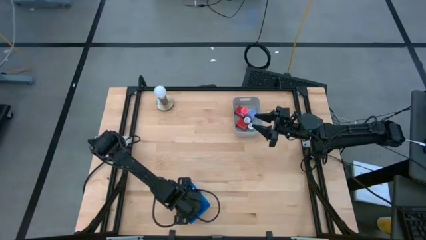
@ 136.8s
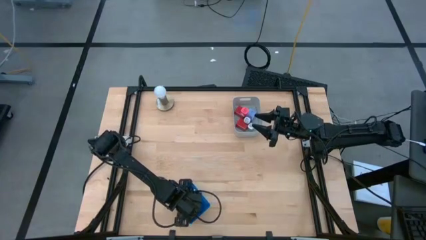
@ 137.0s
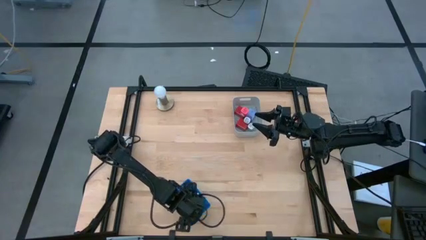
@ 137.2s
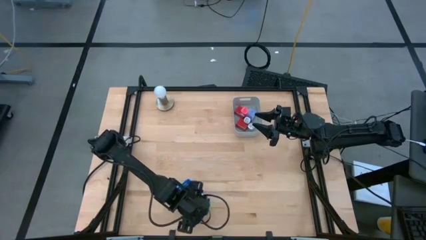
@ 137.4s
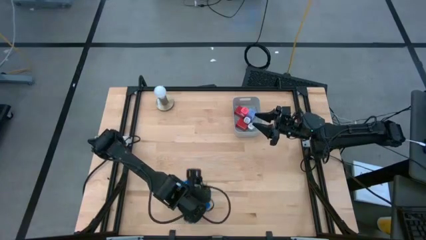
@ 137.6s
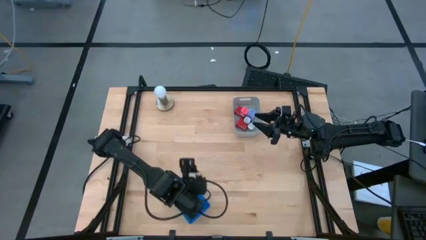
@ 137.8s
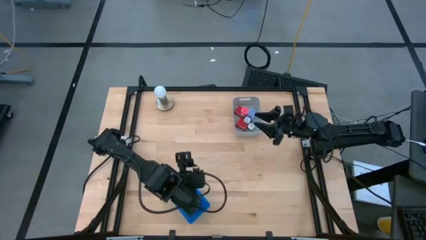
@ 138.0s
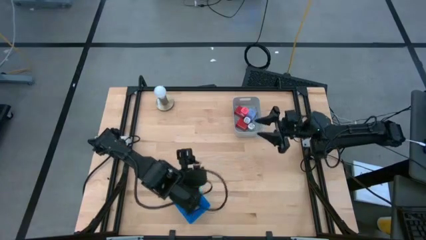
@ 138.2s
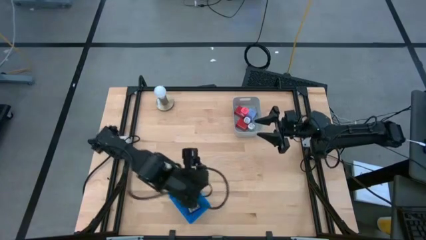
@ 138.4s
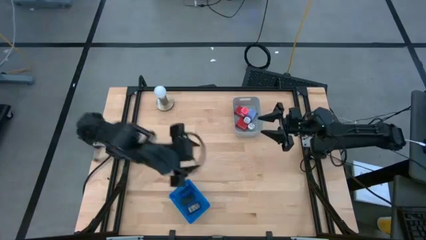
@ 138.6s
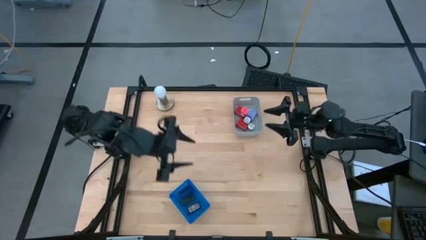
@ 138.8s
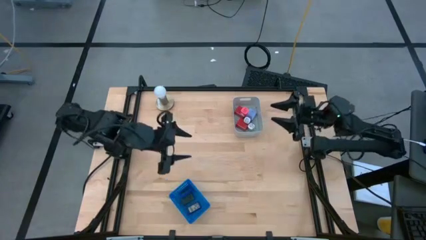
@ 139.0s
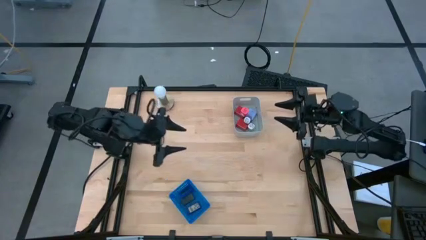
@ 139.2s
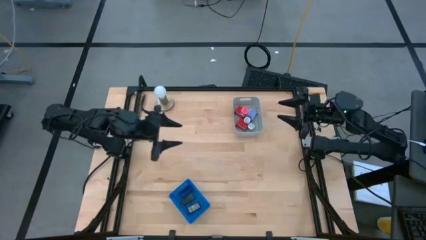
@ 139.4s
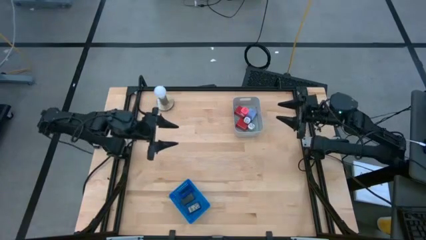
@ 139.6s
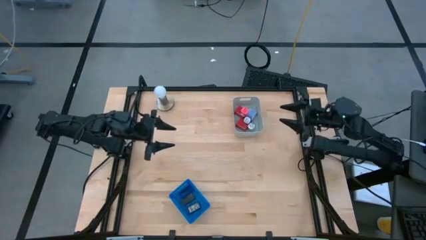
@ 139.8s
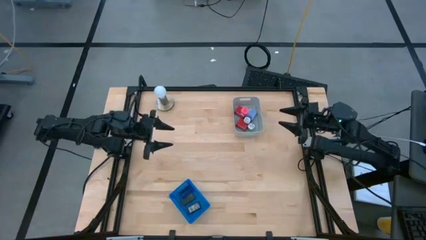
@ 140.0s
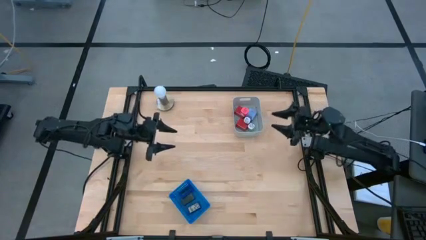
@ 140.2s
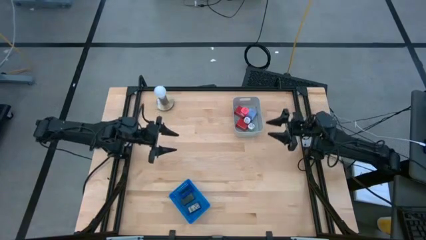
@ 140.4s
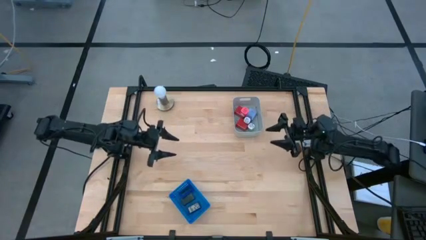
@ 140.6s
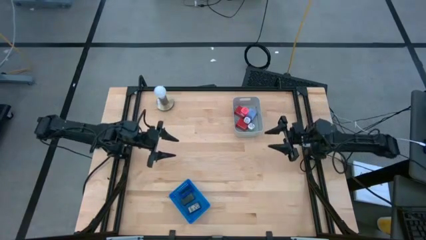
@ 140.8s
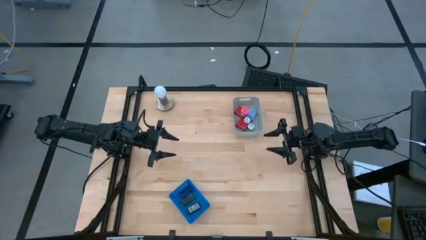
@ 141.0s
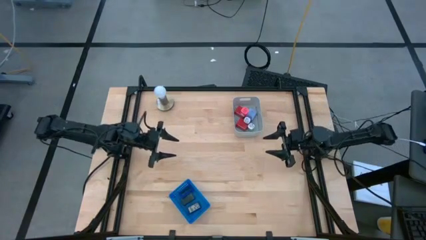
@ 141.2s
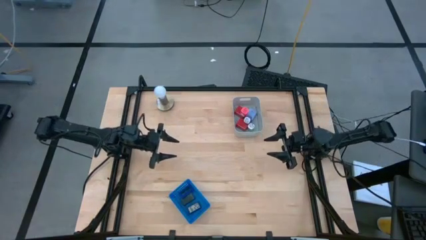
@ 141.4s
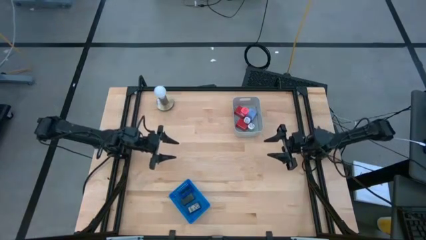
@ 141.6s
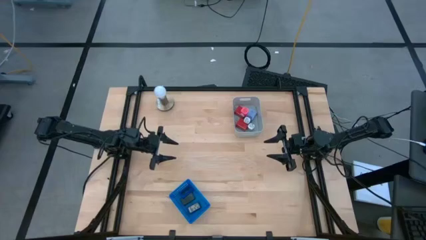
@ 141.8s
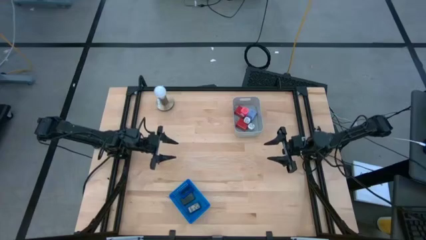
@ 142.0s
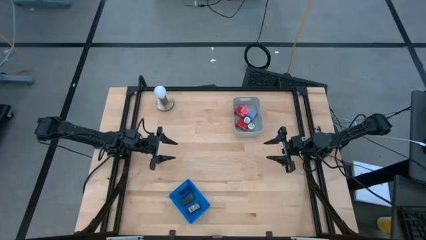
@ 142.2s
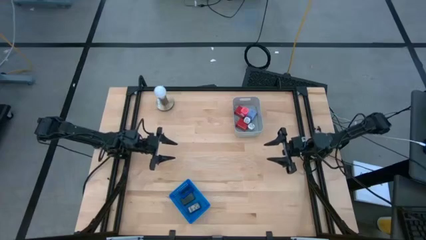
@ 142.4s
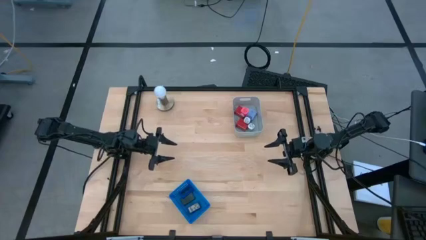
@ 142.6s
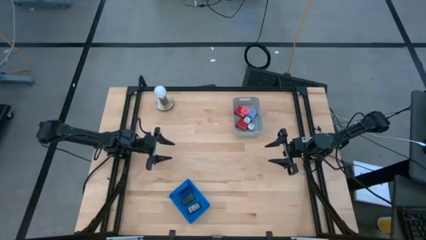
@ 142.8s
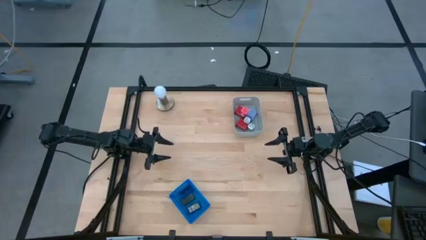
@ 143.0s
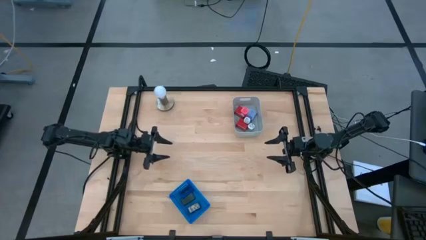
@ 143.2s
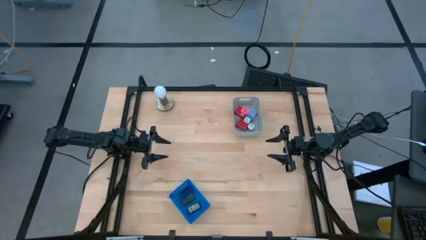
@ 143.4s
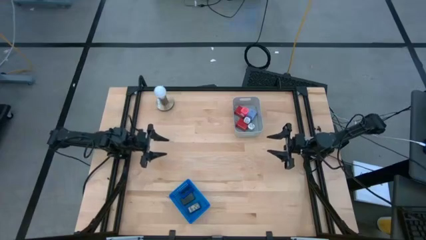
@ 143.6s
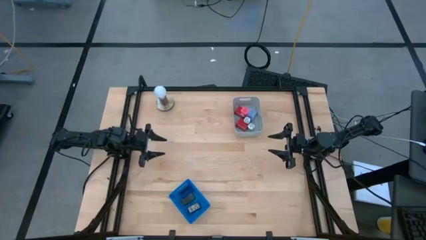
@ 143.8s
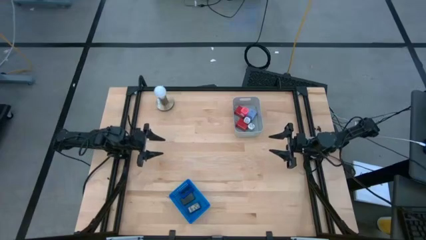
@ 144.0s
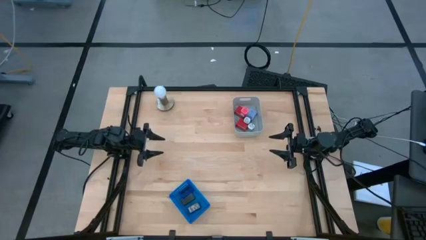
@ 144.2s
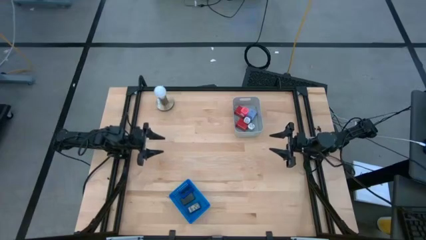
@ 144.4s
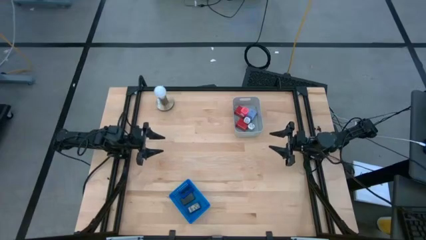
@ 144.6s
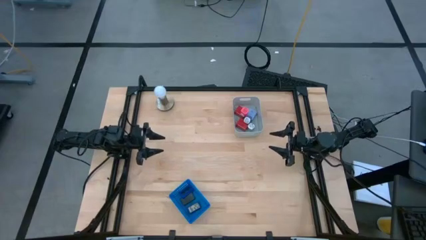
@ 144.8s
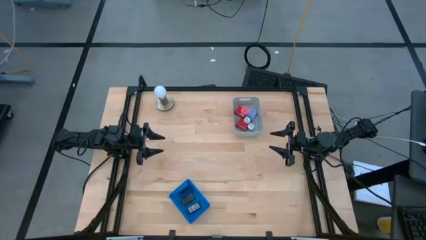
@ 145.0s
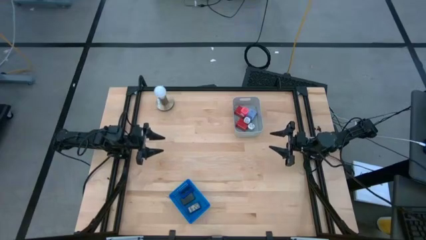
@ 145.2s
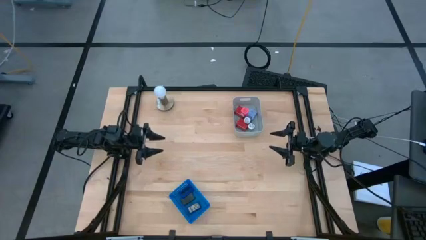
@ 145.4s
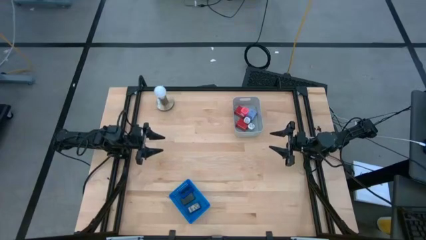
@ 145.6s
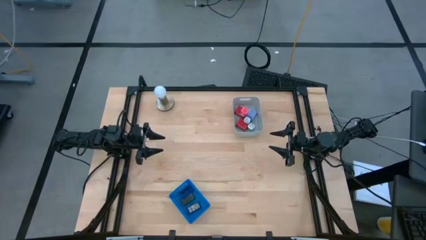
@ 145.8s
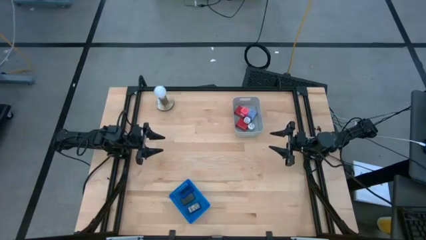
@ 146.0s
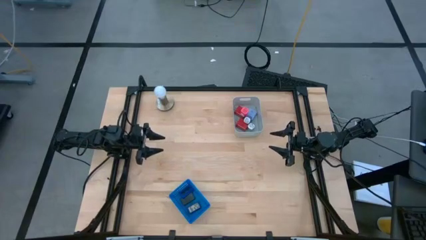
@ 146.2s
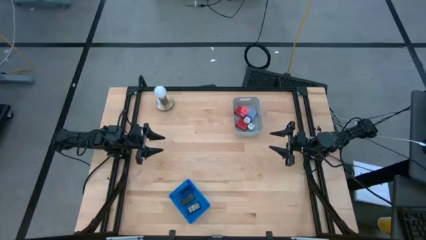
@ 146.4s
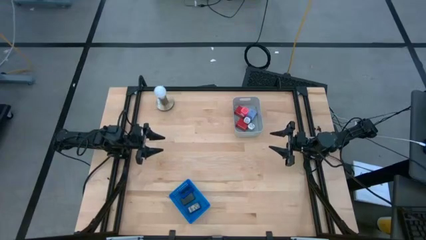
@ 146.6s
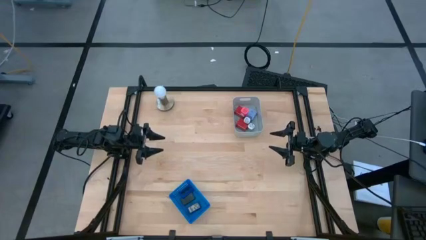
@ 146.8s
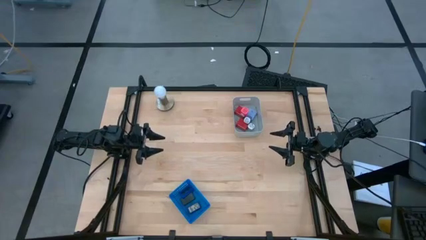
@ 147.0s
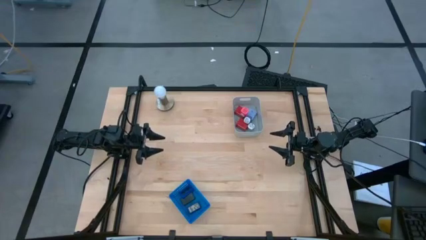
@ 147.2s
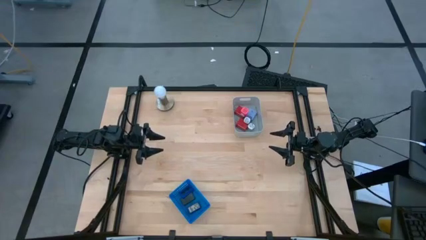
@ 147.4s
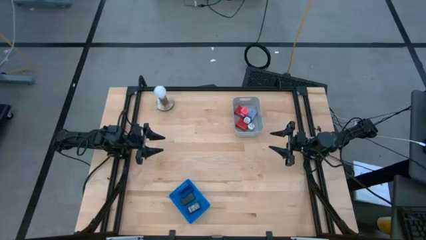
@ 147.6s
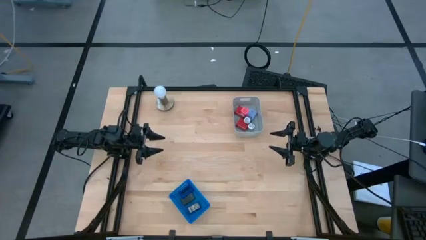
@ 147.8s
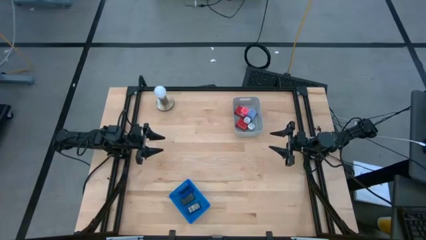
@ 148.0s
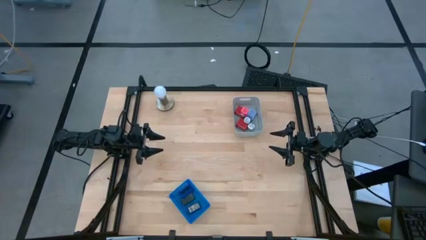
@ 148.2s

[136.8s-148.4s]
Task: Pick & Place Office items
Return to Home Position

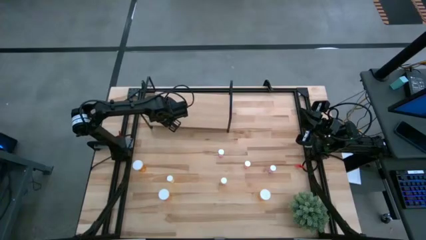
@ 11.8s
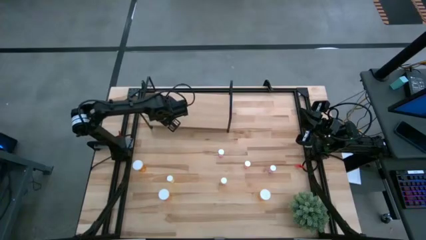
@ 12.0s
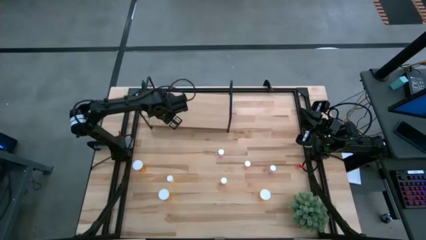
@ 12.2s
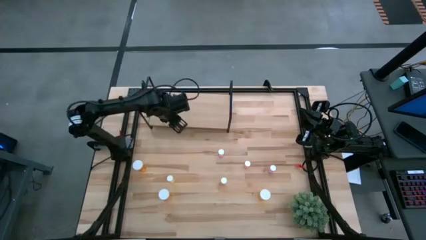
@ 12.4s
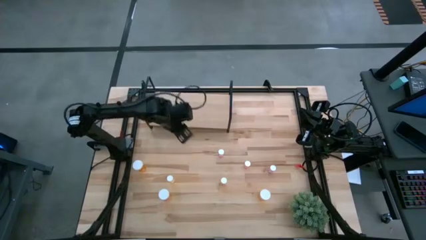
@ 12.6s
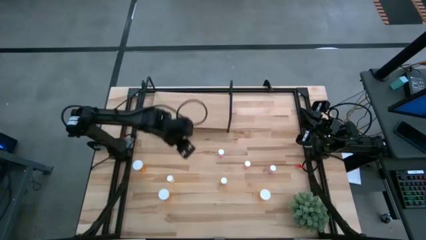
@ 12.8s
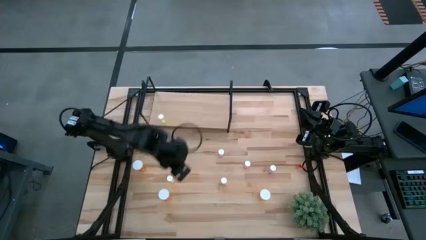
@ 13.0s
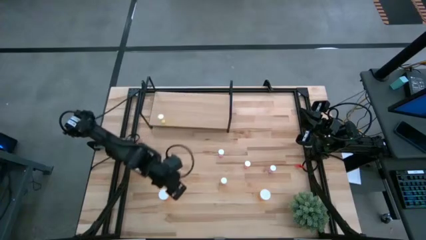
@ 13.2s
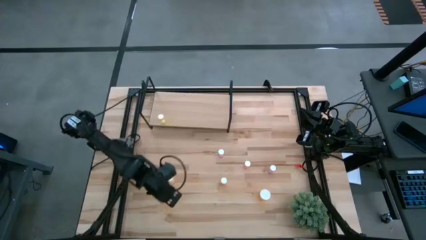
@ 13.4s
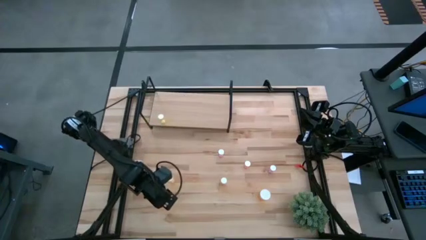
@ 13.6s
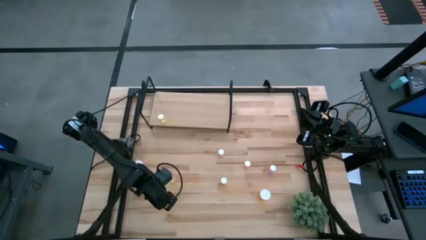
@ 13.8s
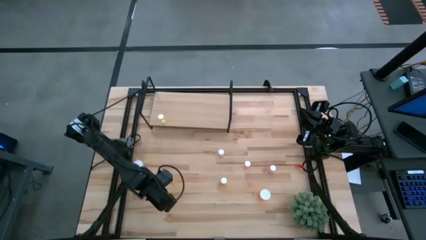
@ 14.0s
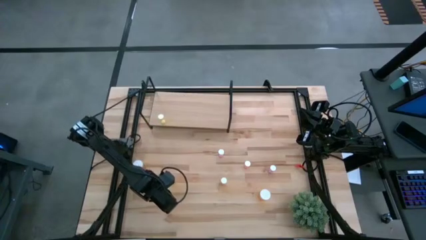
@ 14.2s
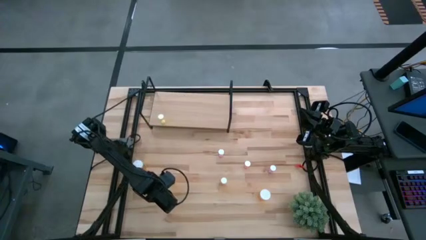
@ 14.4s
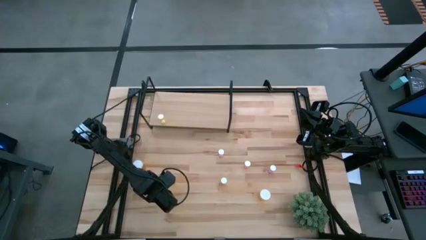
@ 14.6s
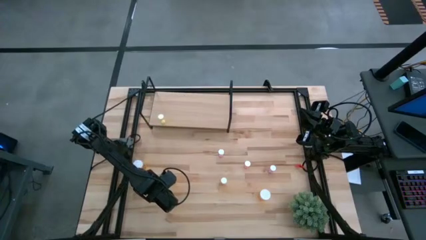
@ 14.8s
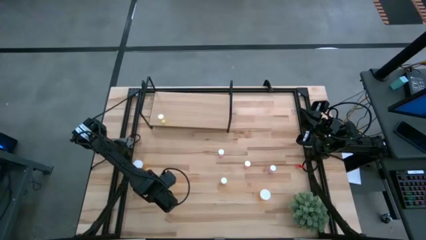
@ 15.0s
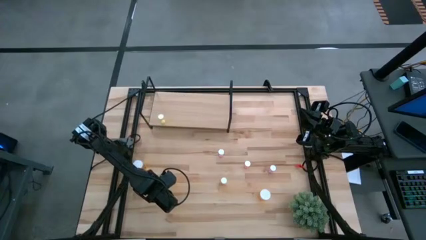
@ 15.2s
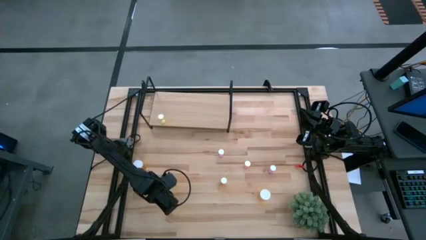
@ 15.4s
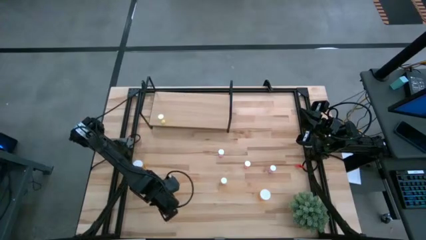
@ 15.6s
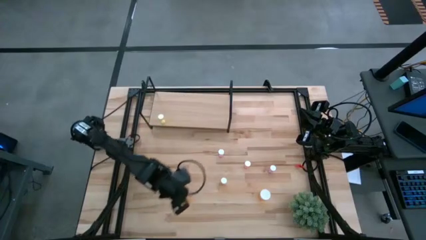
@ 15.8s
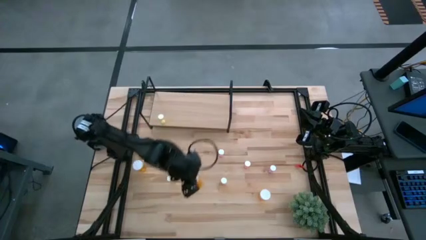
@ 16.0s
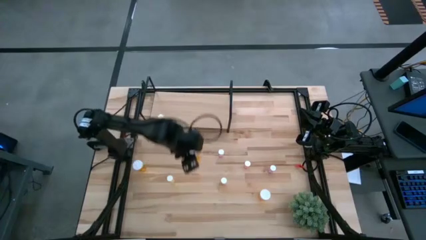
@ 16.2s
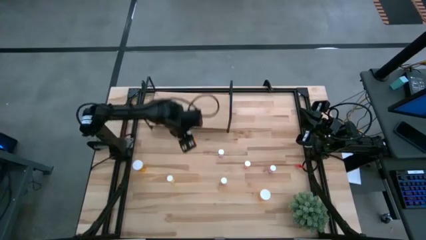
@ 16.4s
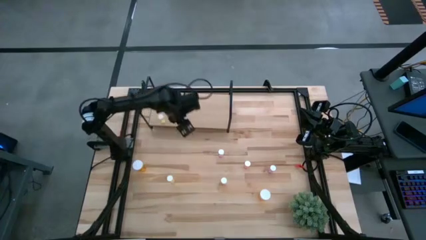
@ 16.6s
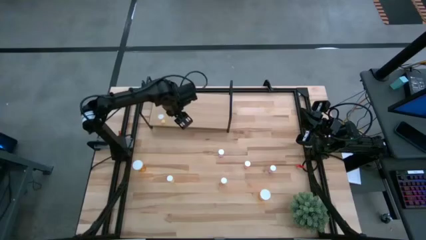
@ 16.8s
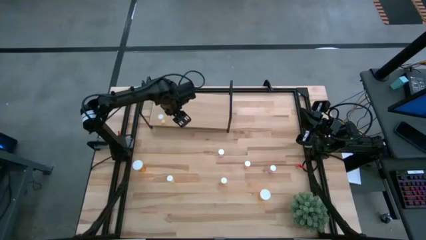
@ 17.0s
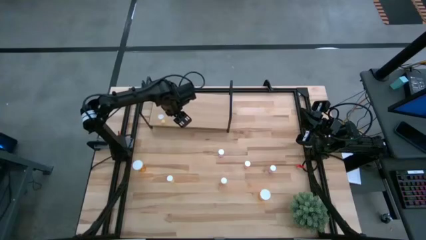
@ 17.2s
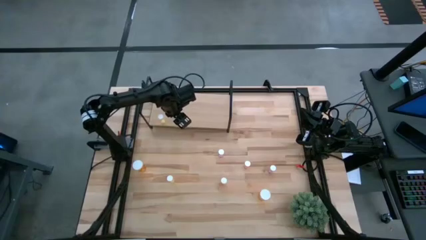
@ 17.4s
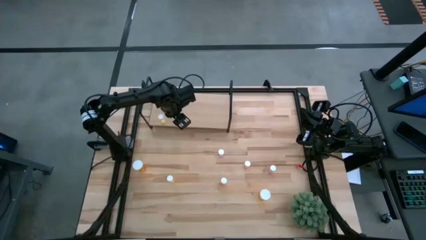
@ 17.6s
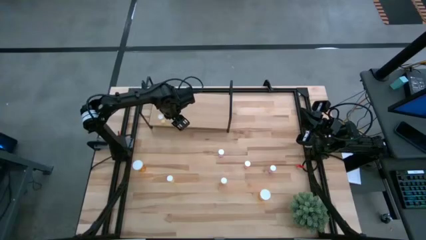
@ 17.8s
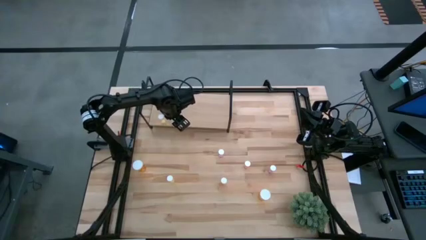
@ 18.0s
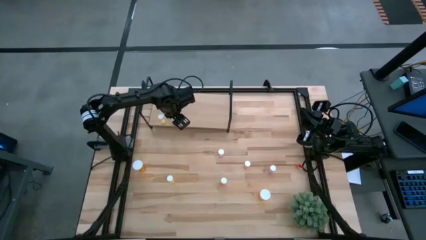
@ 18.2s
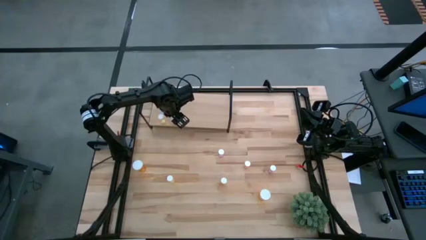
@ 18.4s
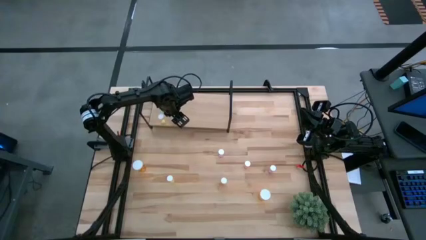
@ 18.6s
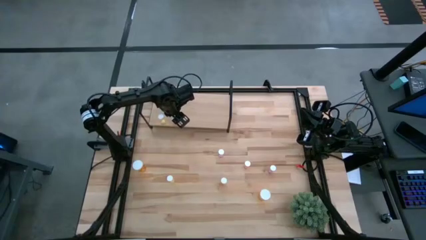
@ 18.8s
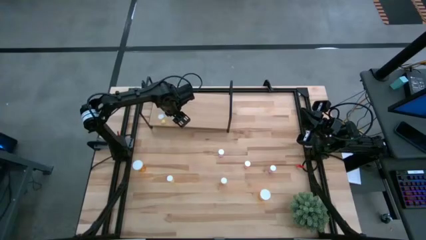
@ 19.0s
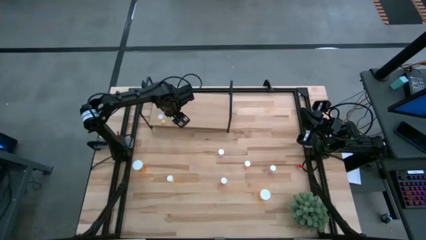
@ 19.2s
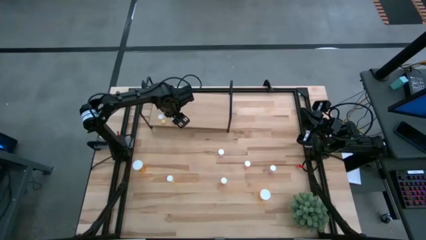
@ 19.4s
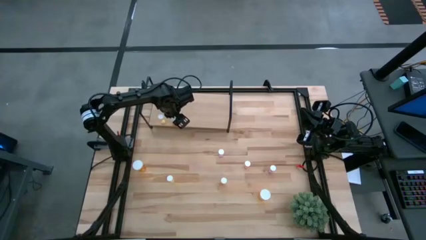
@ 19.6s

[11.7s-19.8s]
Task: Pick and place medicine bottles onto shelf by color
Put the bottom left orange pill bottle on the shelf
